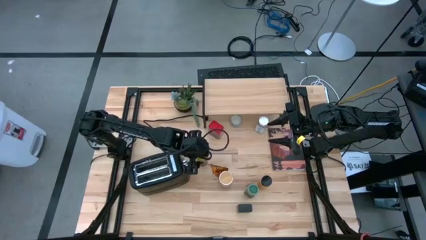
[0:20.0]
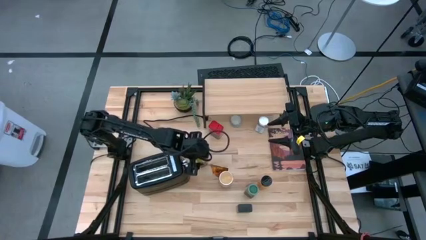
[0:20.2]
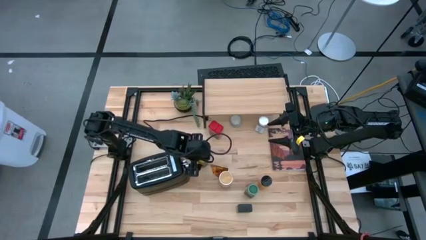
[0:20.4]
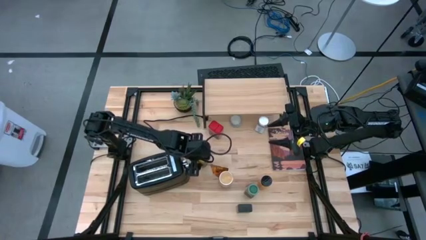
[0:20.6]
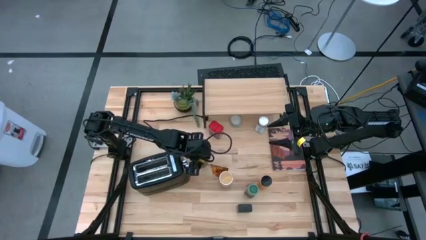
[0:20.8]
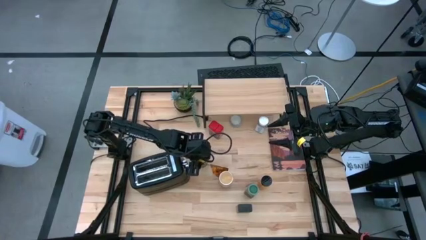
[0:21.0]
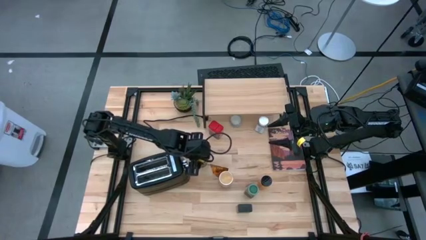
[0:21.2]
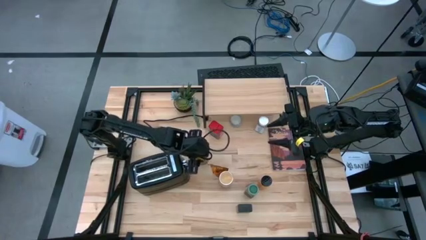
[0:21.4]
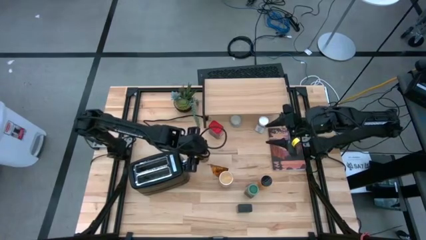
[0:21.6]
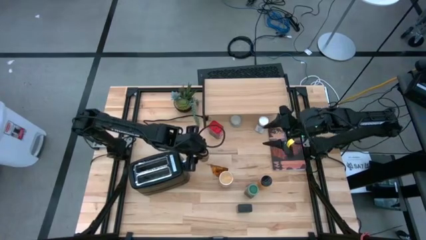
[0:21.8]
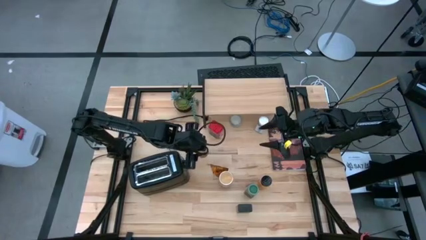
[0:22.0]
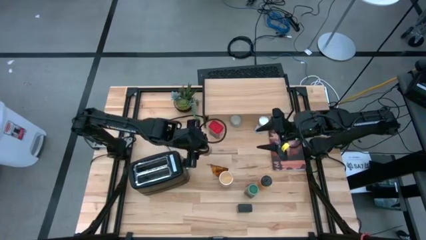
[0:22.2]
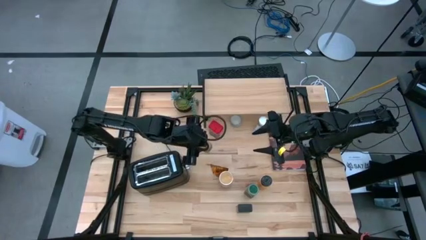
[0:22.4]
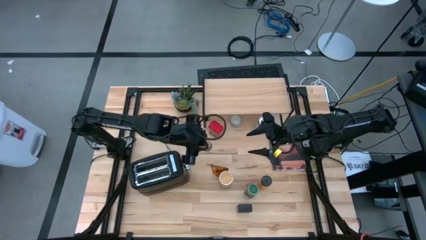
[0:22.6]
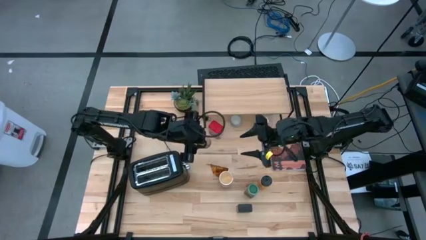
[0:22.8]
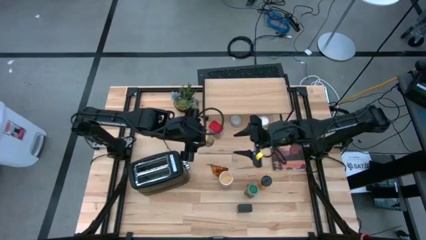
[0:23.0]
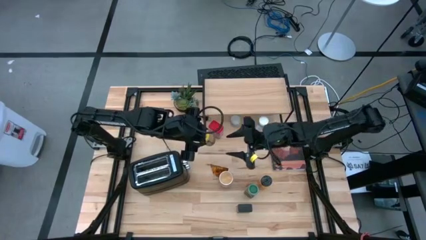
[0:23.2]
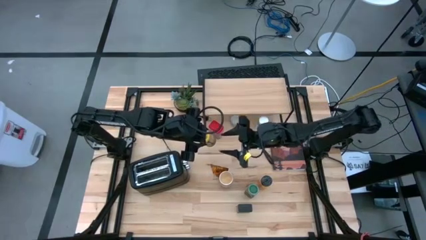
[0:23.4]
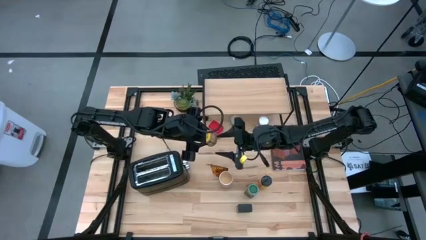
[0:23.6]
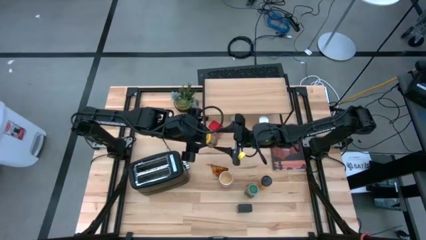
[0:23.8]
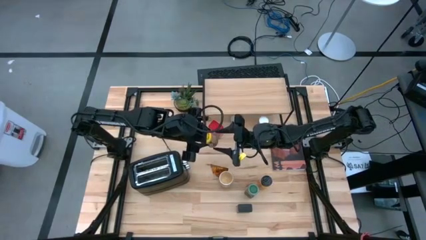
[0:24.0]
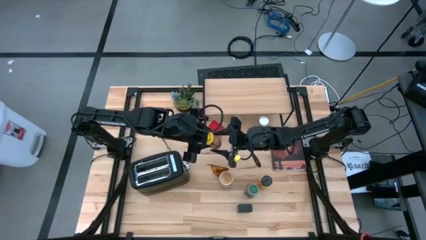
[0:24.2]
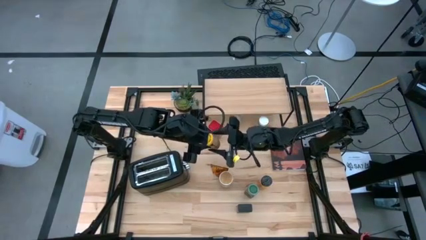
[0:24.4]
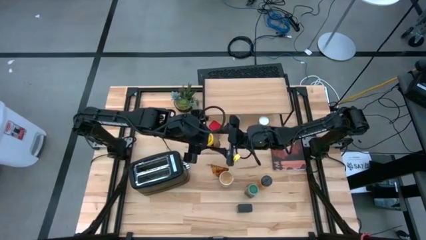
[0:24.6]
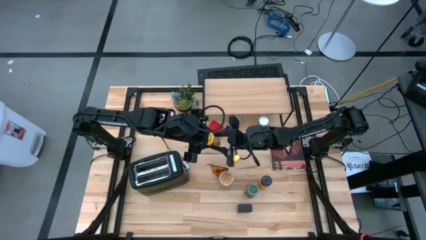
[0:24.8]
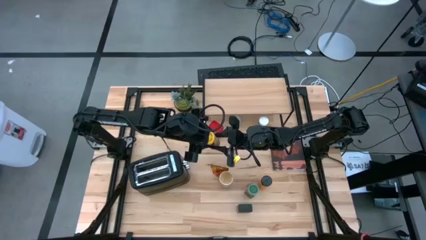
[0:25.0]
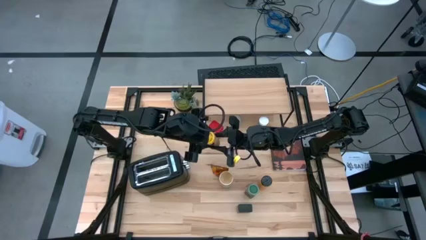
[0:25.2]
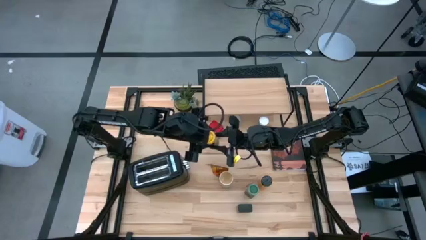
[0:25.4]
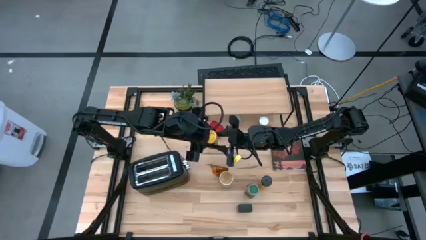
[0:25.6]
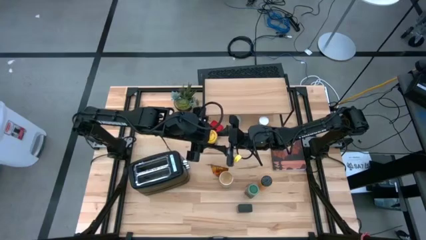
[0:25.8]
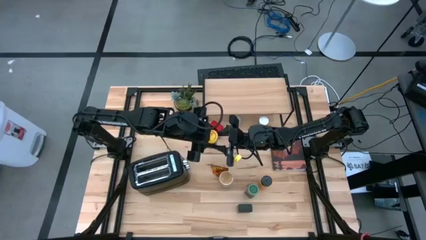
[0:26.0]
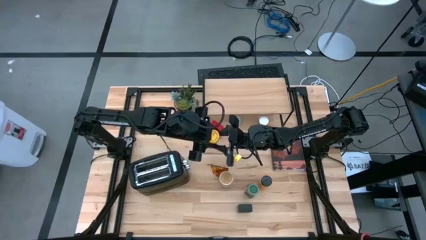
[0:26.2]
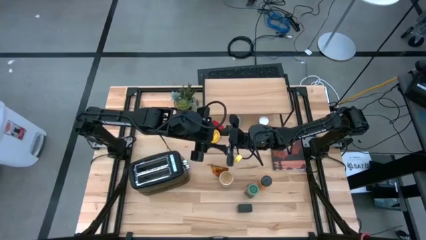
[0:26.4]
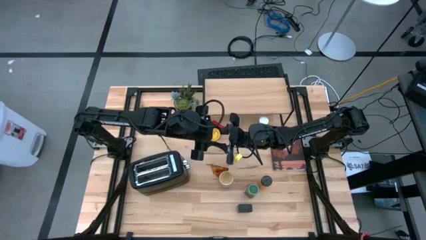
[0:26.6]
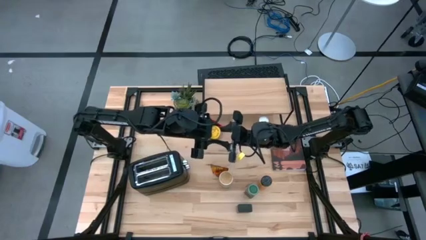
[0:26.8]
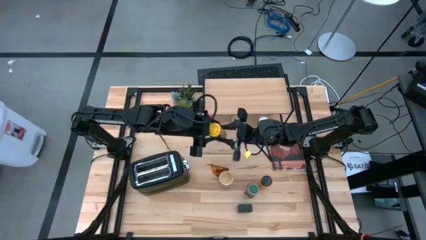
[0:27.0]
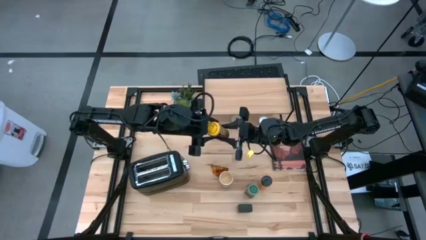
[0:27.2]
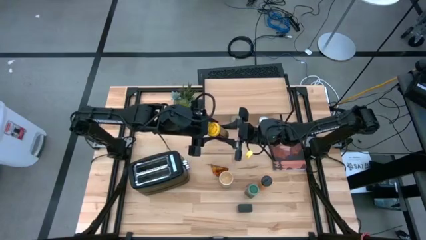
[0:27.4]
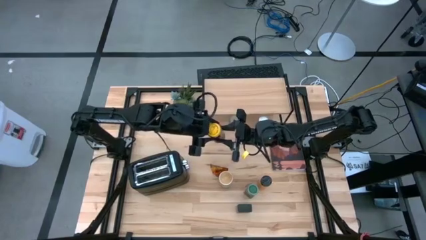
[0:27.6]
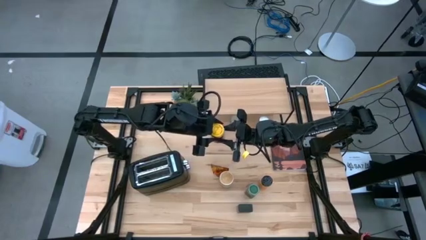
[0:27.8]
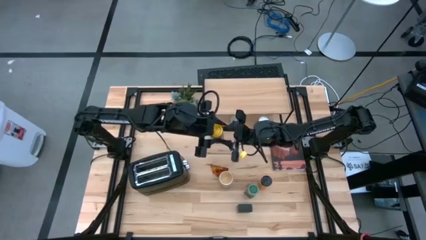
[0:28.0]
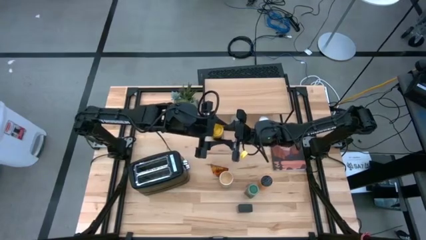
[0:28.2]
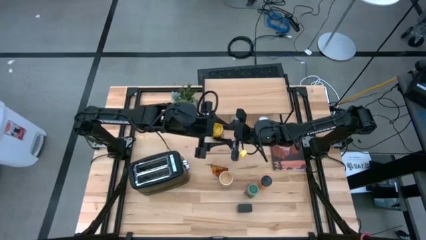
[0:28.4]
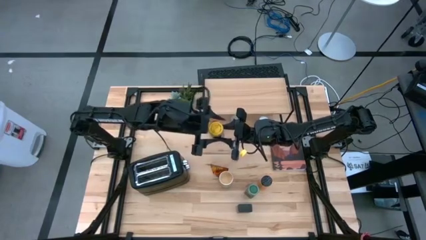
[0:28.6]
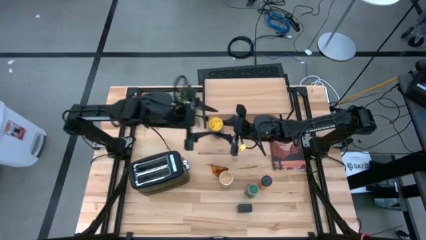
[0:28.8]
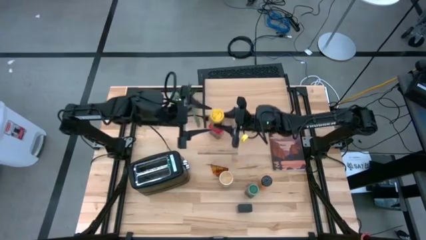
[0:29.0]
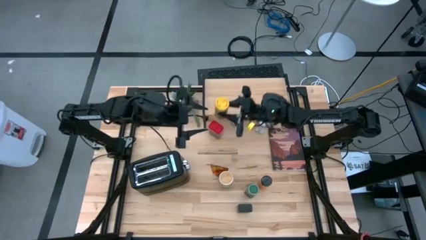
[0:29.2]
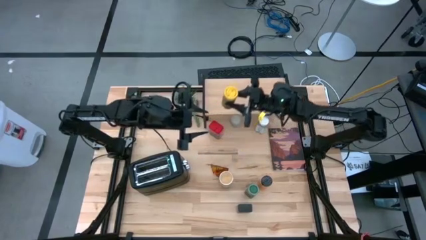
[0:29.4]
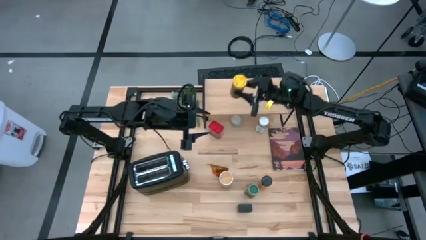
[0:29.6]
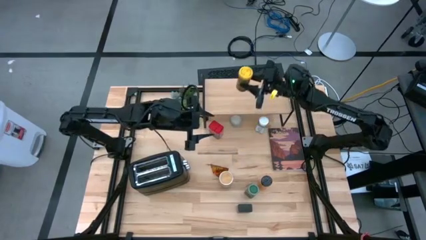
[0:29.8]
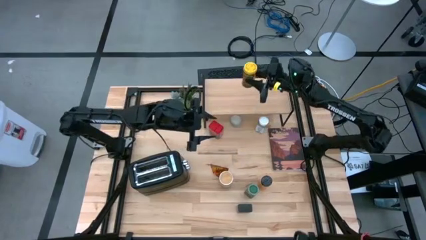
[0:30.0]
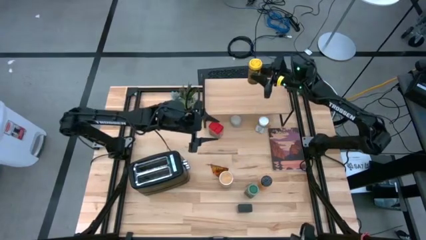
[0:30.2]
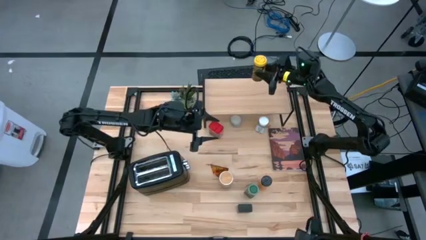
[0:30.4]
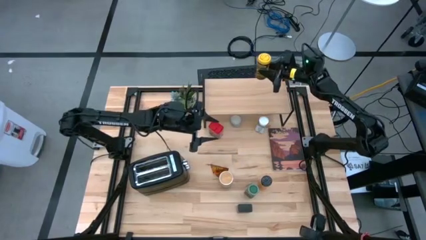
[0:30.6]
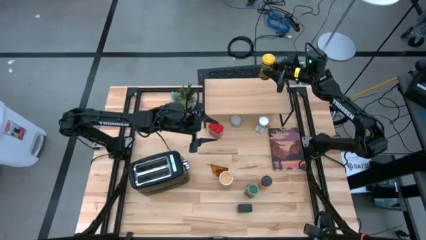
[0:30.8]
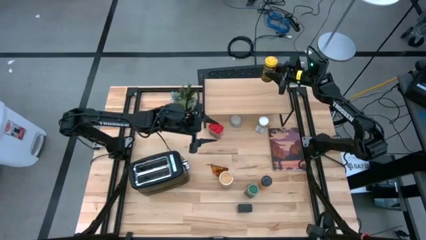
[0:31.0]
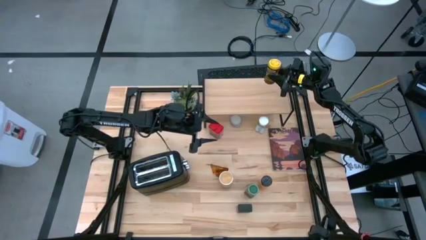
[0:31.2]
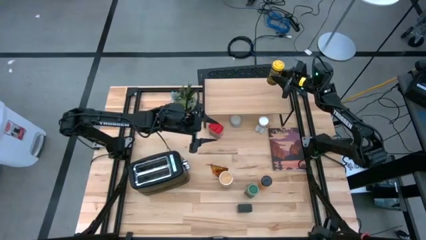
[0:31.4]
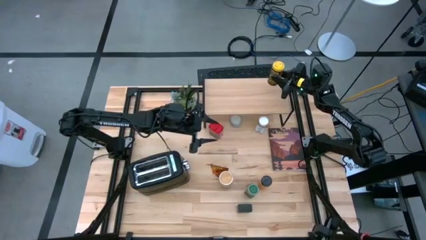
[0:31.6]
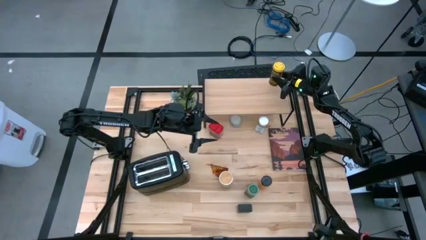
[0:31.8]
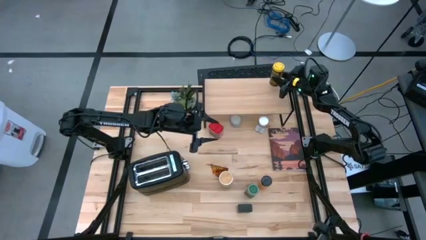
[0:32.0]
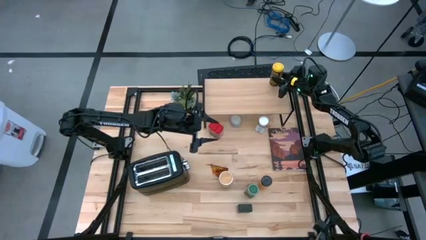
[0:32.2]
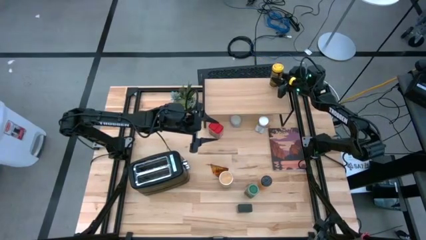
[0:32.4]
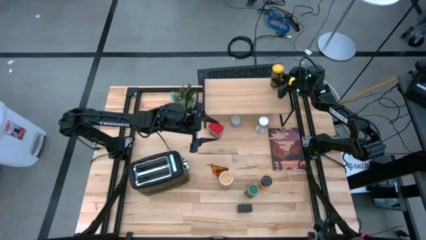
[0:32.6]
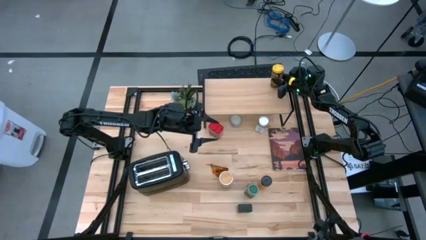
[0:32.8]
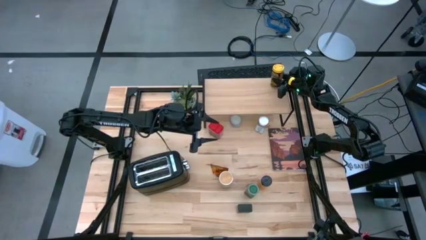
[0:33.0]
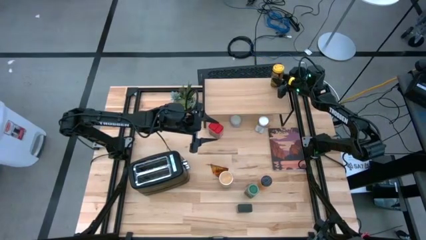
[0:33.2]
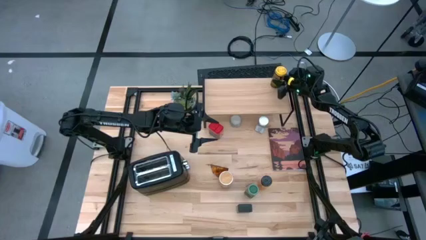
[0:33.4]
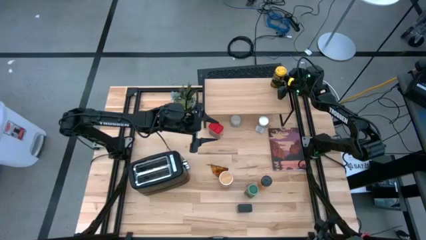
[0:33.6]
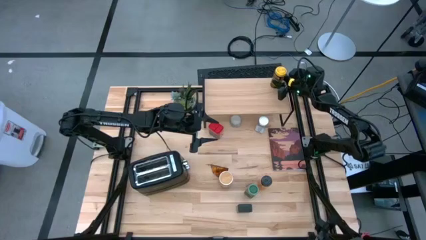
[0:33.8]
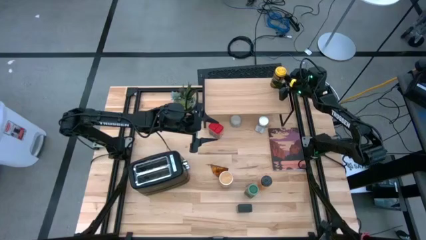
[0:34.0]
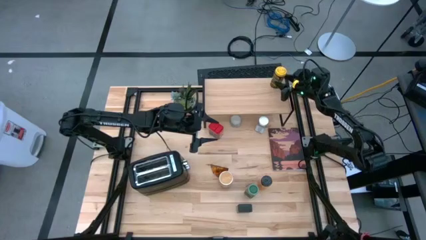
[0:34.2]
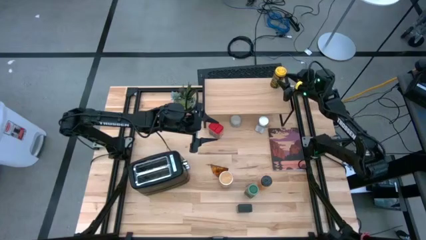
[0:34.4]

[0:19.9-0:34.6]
Task: Shelf spices
Put the yellow seasoning bottle on the shelf
